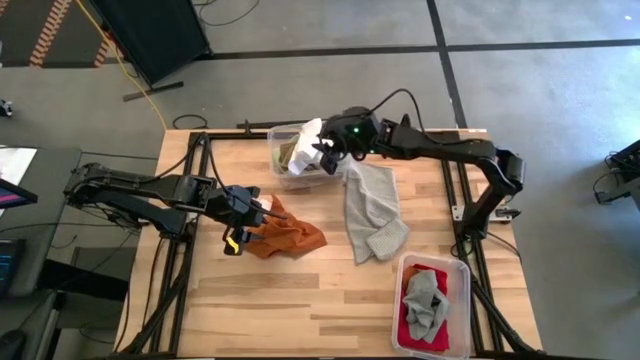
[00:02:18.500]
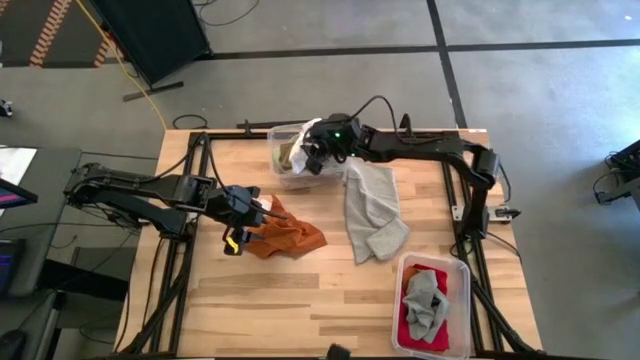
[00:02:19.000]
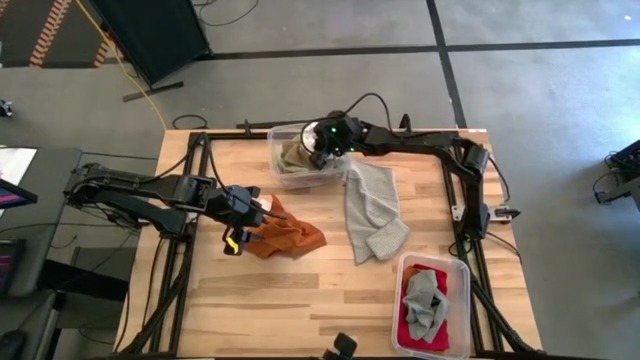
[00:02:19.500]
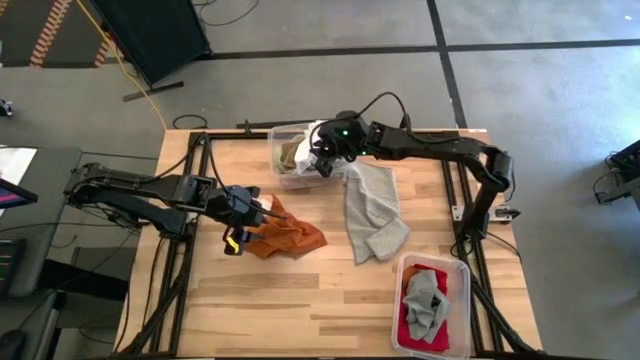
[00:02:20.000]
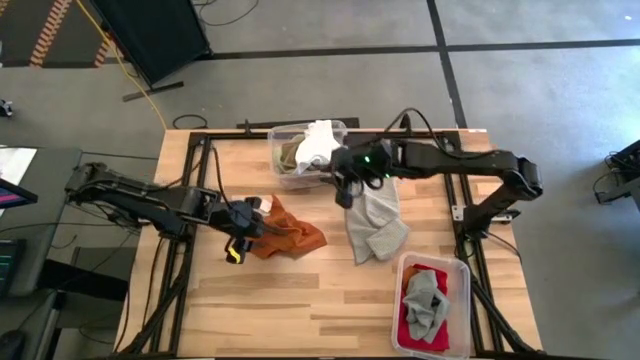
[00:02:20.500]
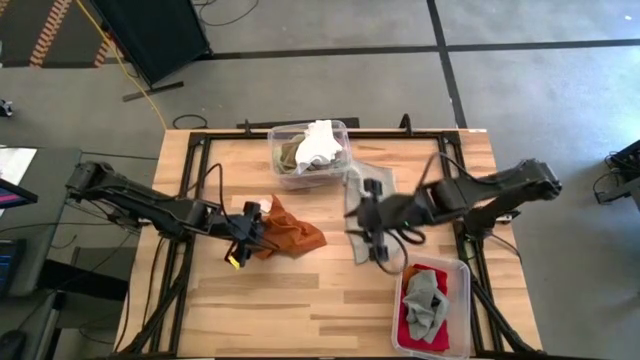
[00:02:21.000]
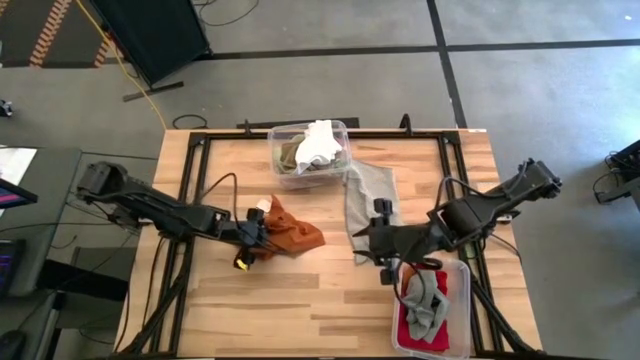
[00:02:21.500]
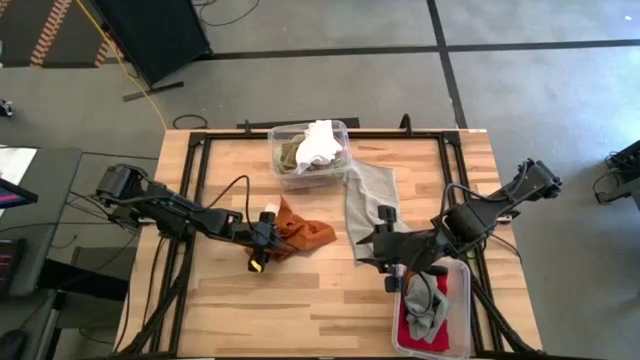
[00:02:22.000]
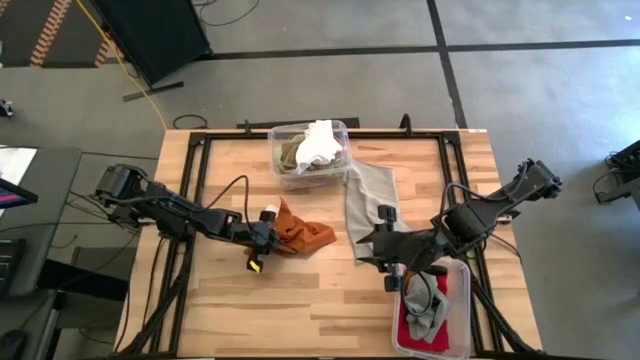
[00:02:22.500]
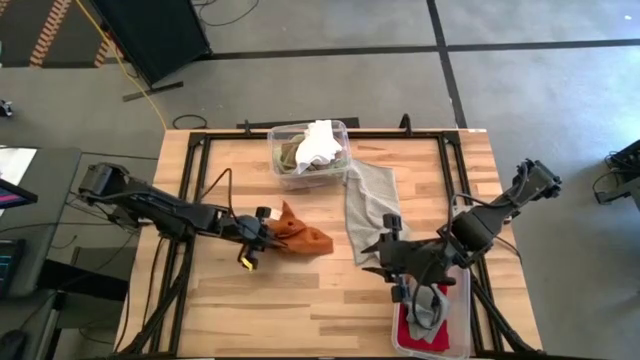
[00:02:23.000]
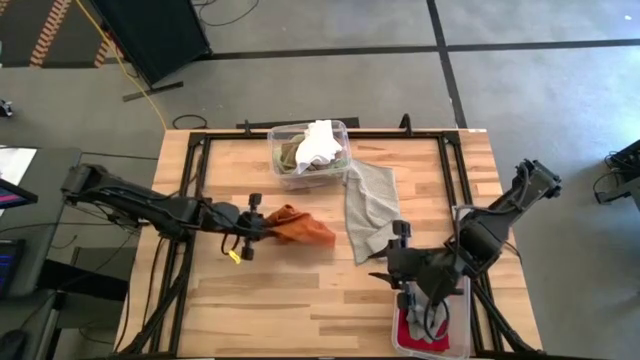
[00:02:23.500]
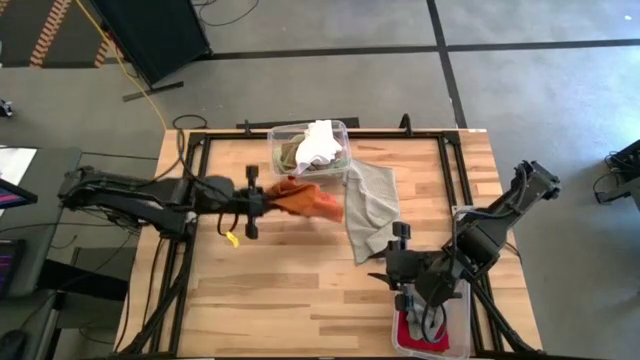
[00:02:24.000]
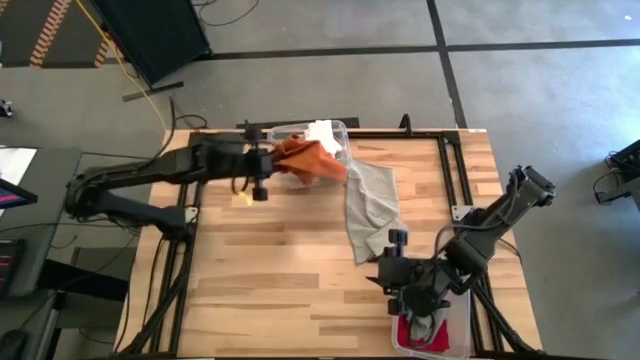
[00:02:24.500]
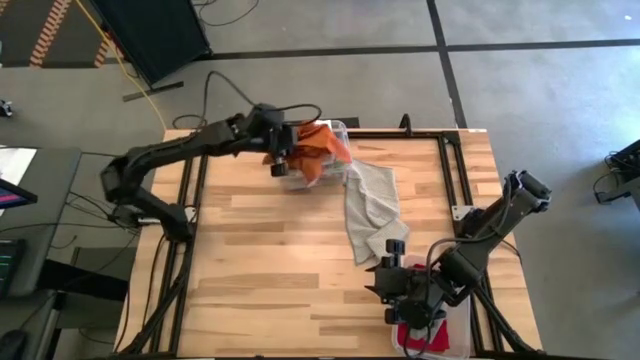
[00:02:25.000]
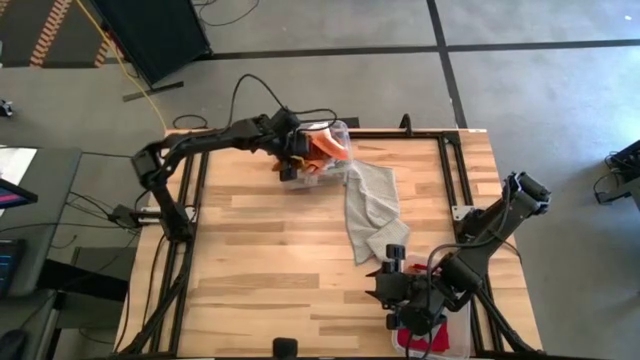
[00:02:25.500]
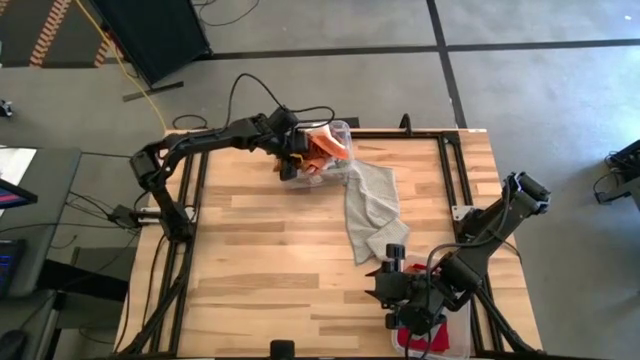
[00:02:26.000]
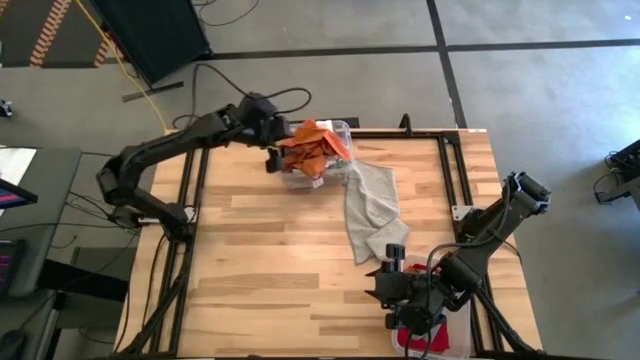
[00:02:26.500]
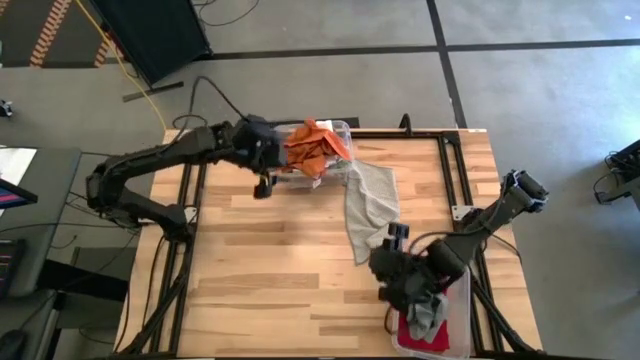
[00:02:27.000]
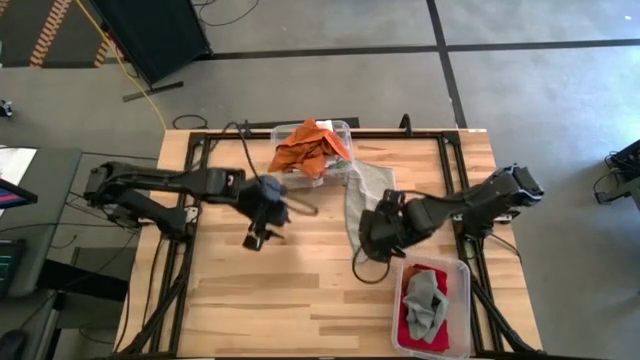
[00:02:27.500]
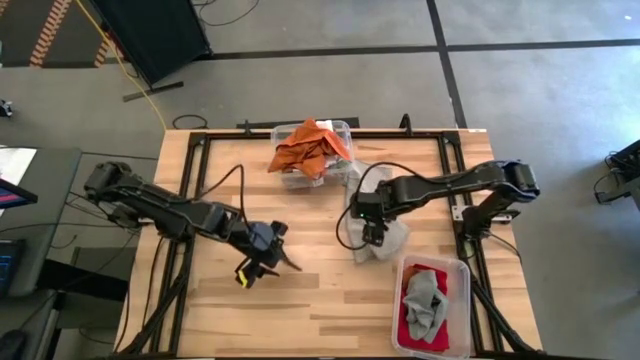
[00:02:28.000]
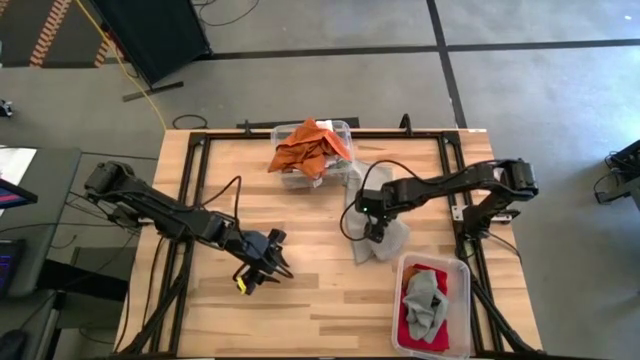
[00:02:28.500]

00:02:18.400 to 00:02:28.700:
Task: Sort towels by color in basket
Put the orange towel into the top transparent bin

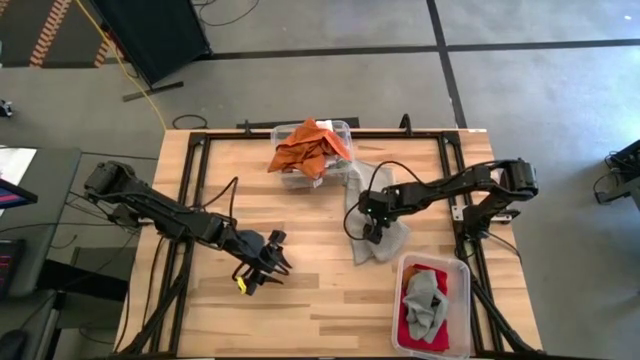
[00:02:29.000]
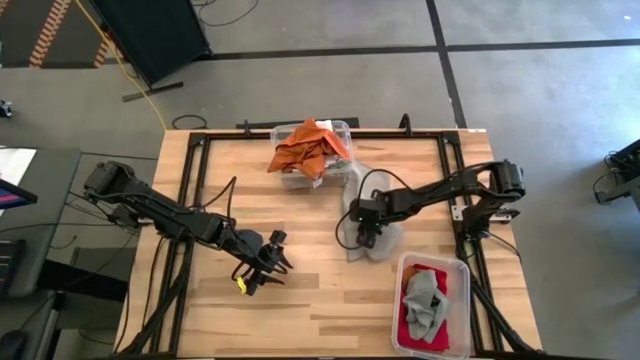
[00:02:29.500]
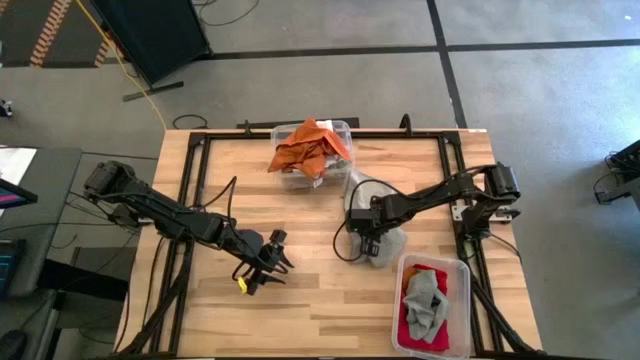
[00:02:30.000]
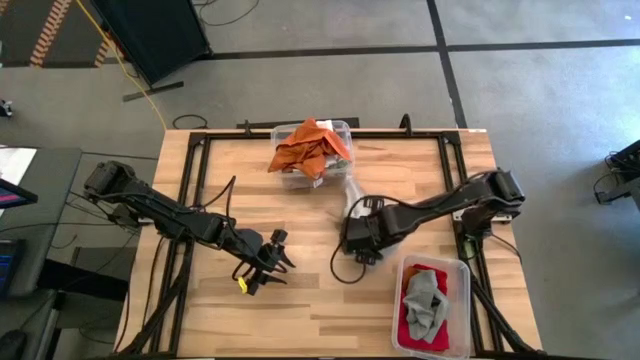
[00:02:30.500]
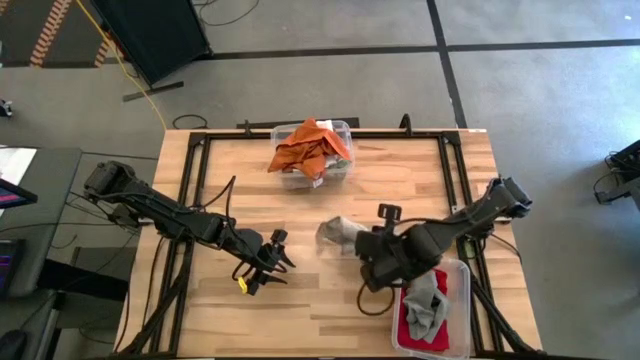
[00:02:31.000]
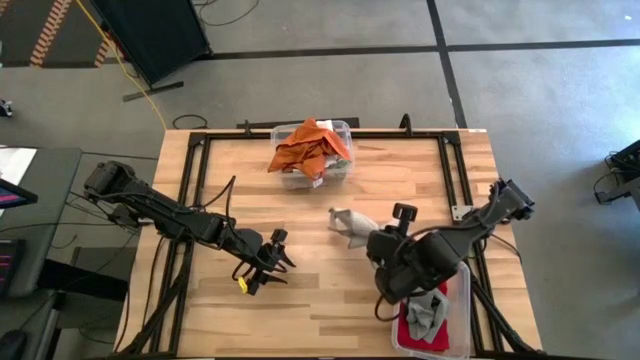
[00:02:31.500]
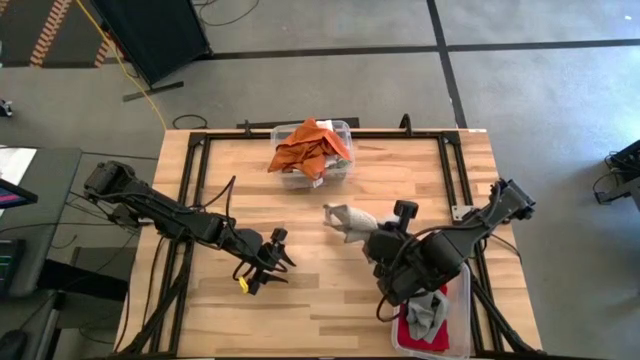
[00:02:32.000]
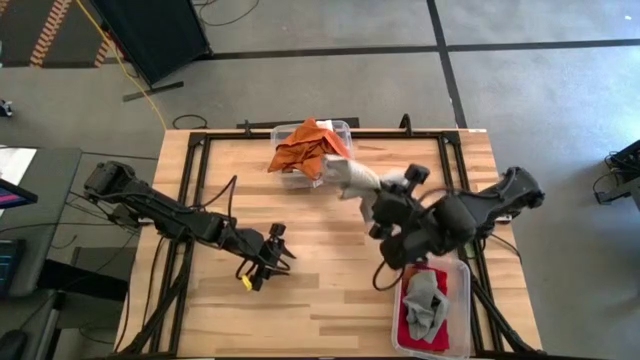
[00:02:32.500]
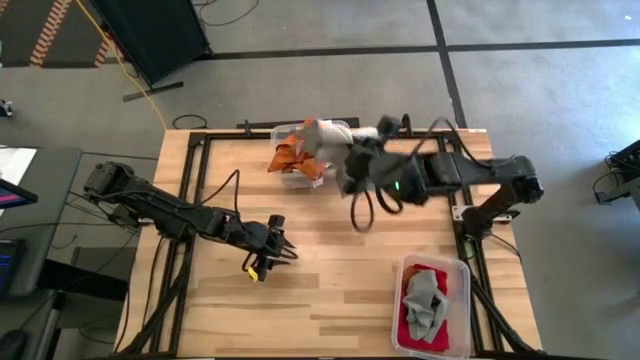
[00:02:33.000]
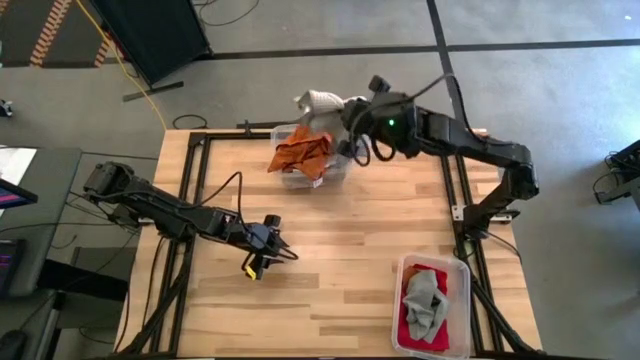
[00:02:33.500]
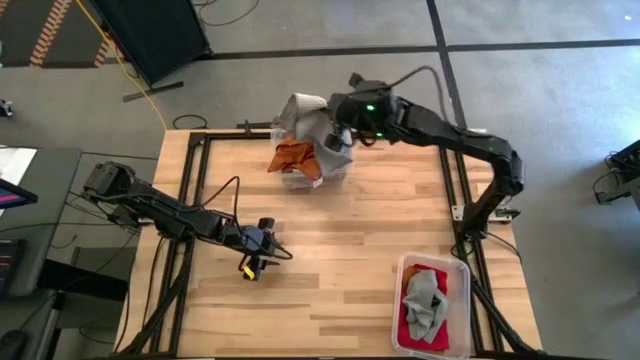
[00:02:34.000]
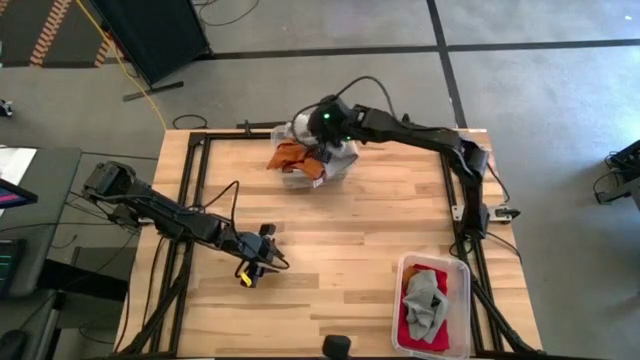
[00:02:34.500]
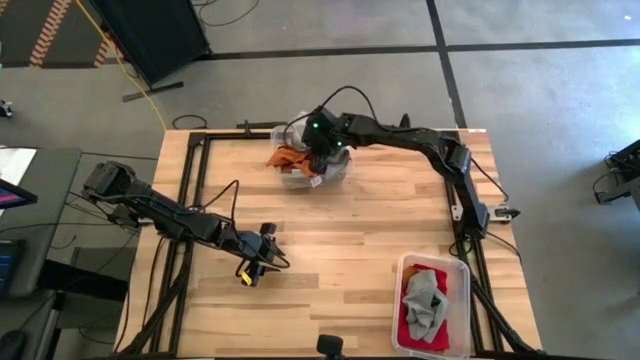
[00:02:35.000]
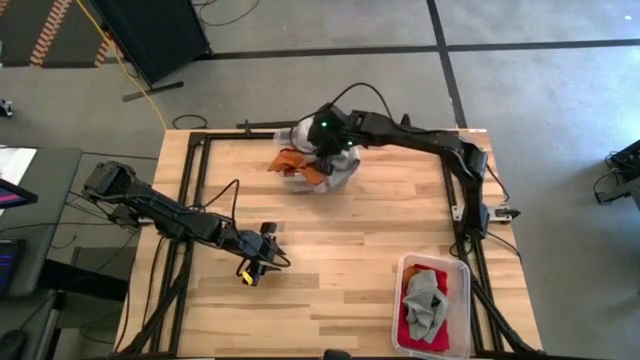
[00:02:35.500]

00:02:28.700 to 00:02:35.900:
Put the light gray towel into the top transparent bin

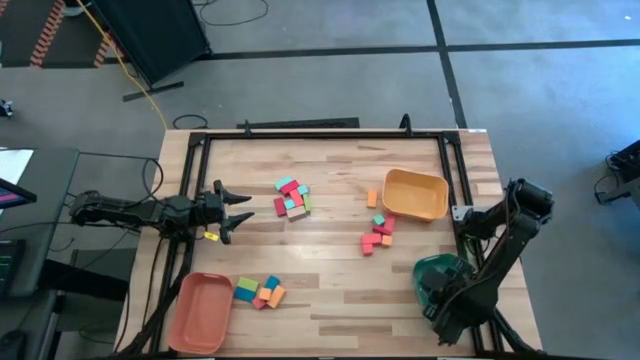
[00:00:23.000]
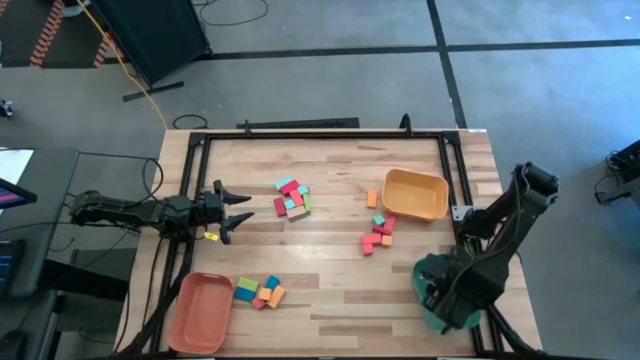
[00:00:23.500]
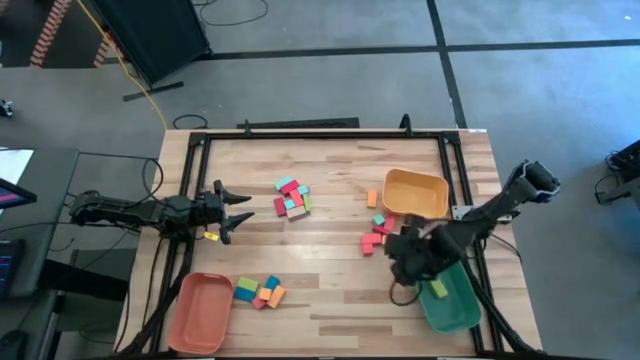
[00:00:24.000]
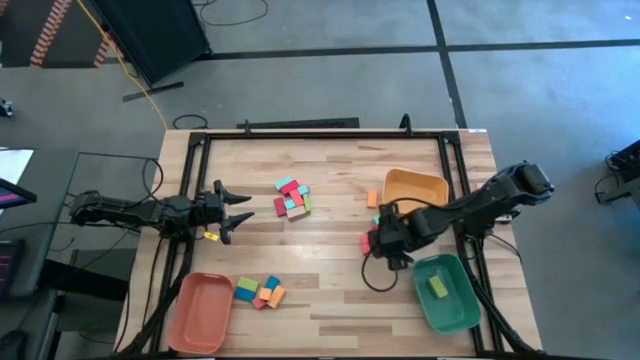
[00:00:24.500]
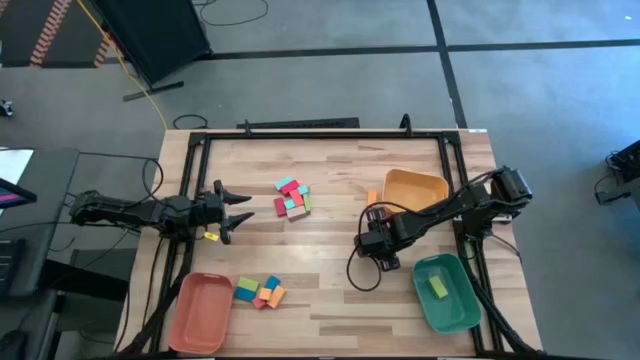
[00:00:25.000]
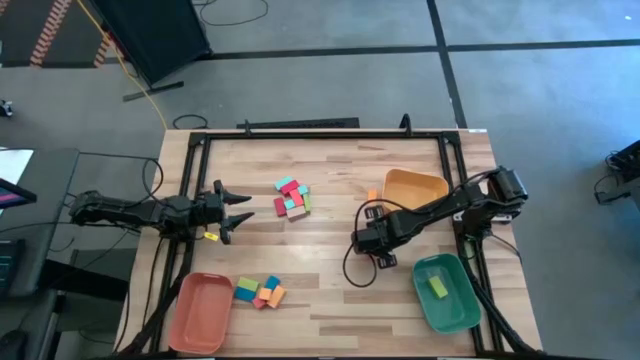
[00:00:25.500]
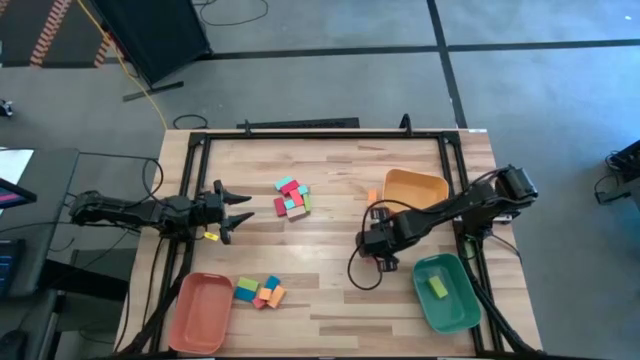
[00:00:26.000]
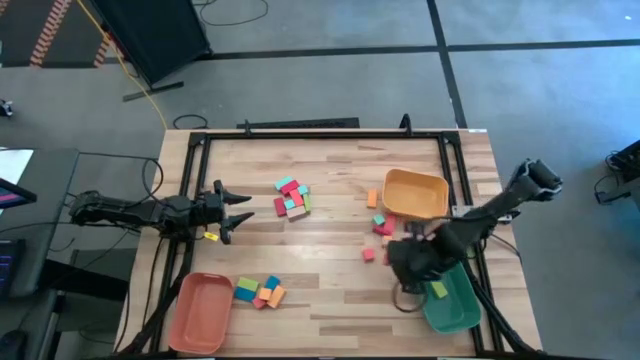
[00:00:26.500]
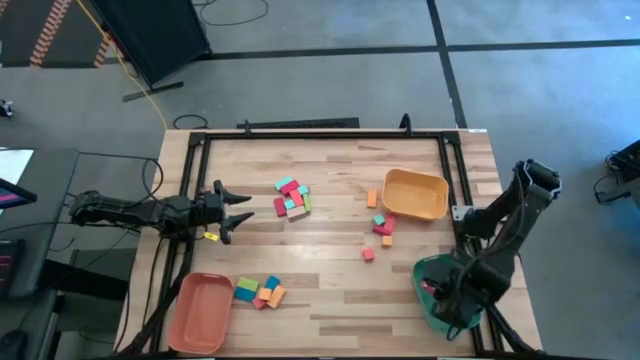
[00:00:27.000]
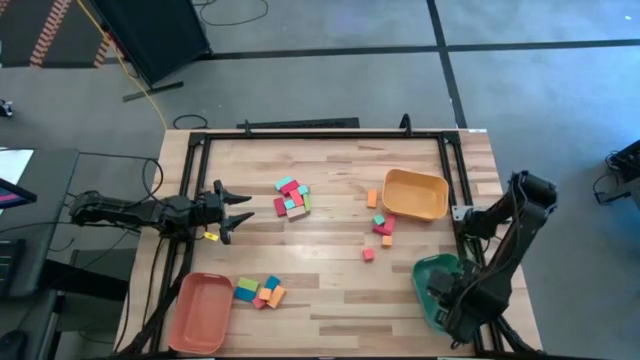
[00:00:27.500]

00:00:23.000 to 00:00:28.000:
Task: Sort blocks by size
Put the large orange block into the green bin
